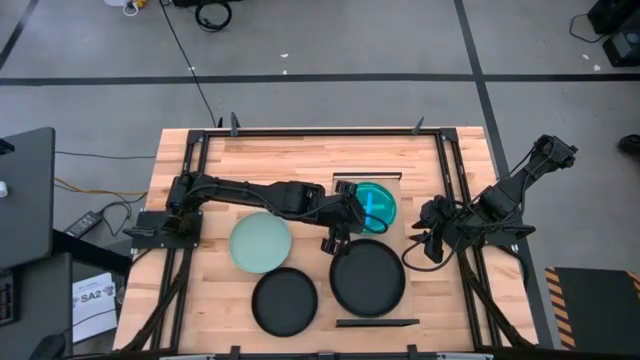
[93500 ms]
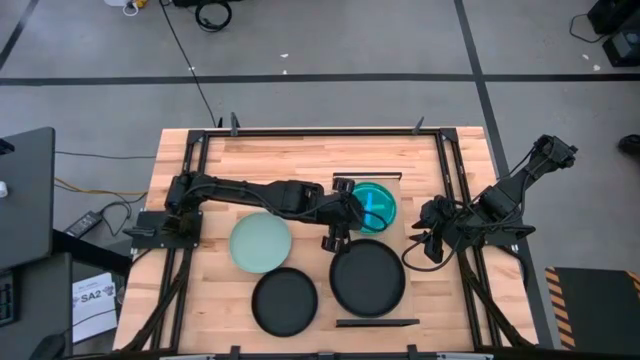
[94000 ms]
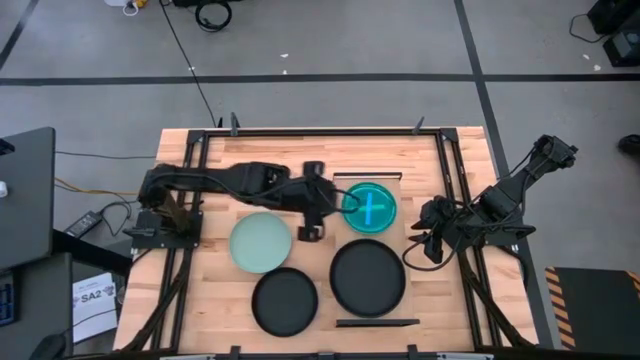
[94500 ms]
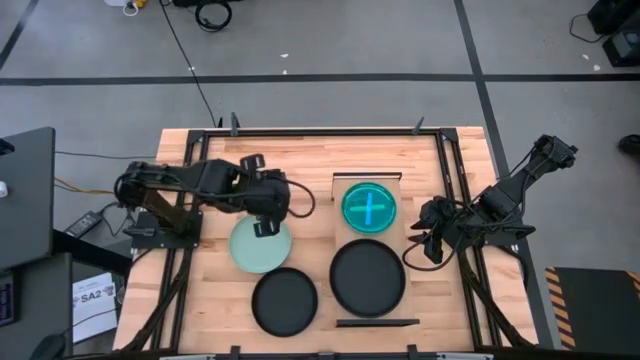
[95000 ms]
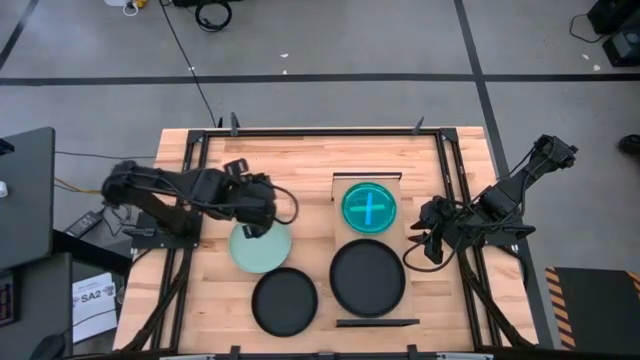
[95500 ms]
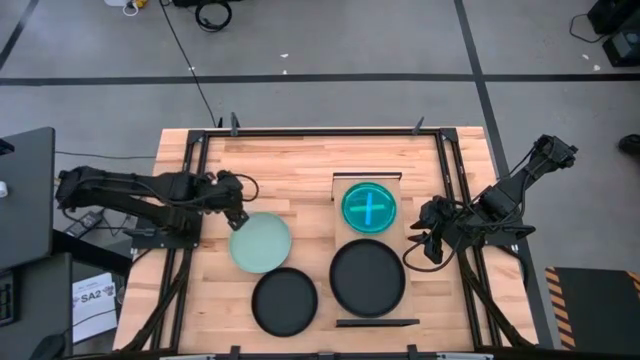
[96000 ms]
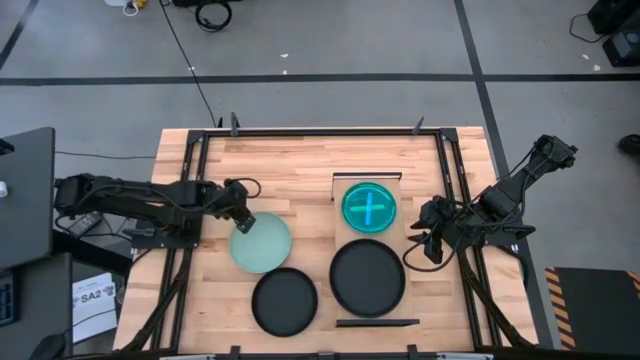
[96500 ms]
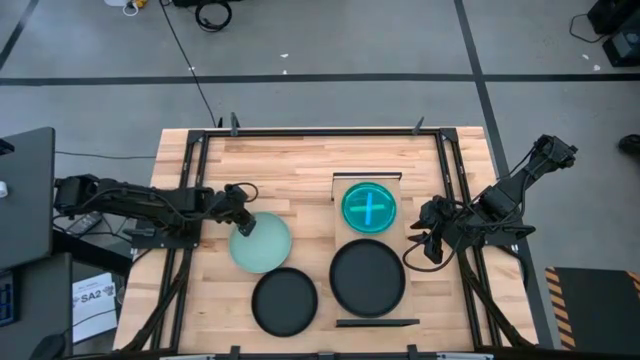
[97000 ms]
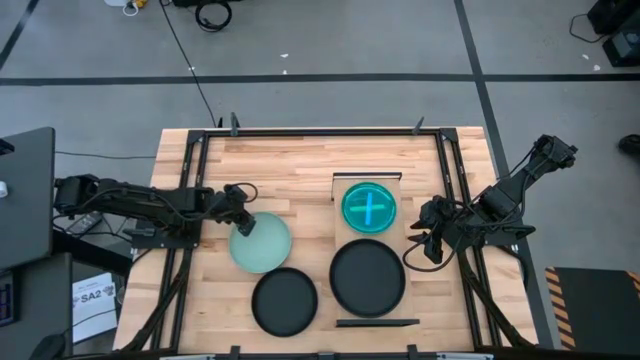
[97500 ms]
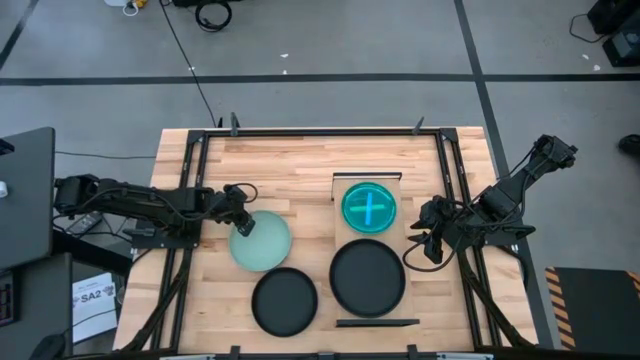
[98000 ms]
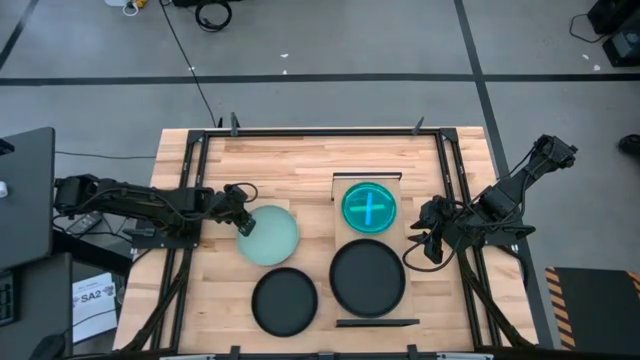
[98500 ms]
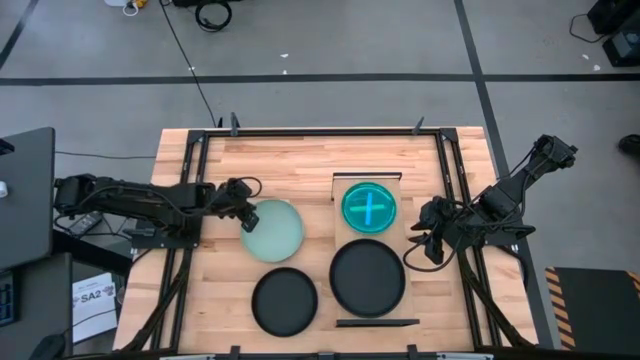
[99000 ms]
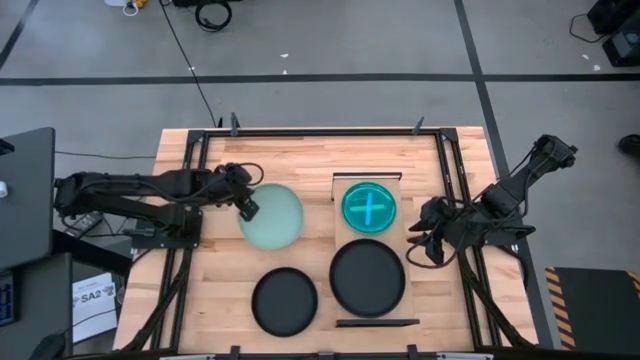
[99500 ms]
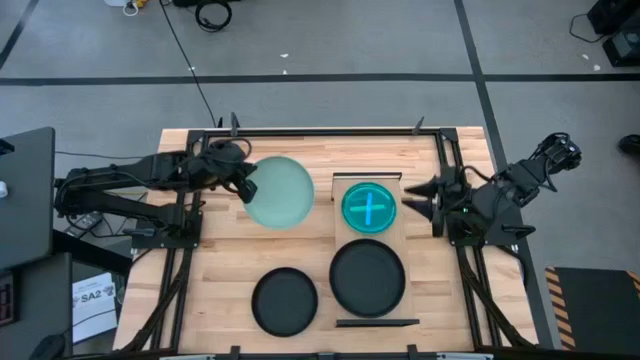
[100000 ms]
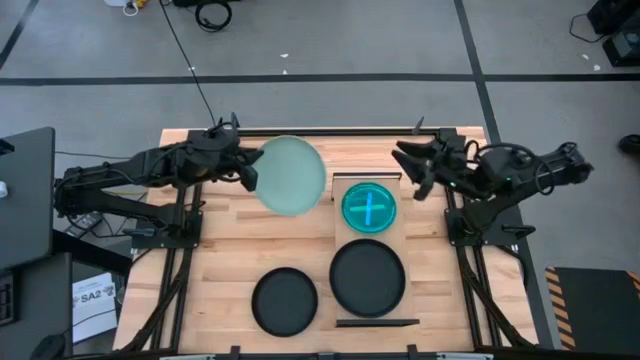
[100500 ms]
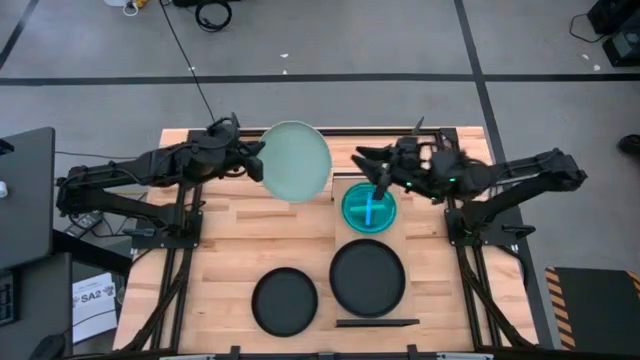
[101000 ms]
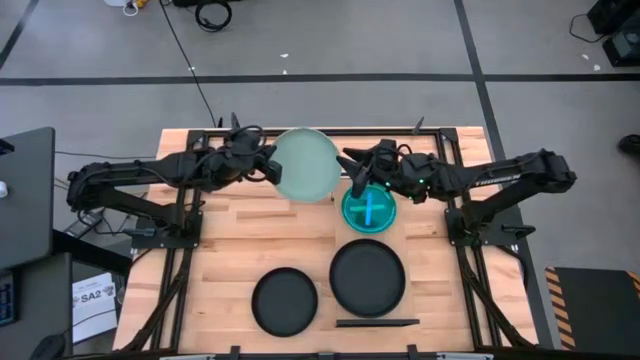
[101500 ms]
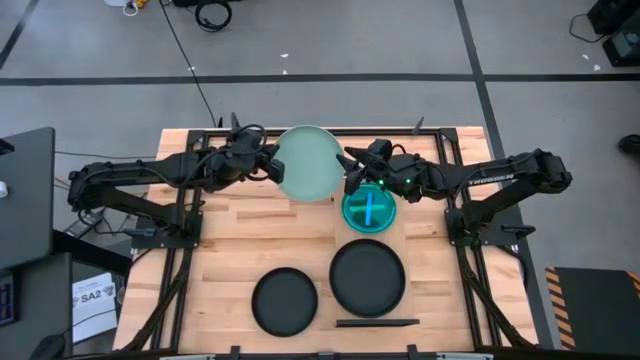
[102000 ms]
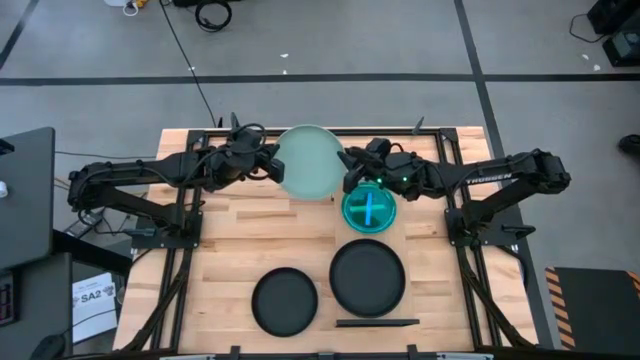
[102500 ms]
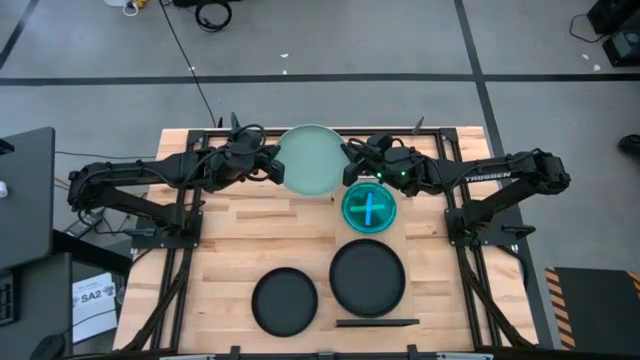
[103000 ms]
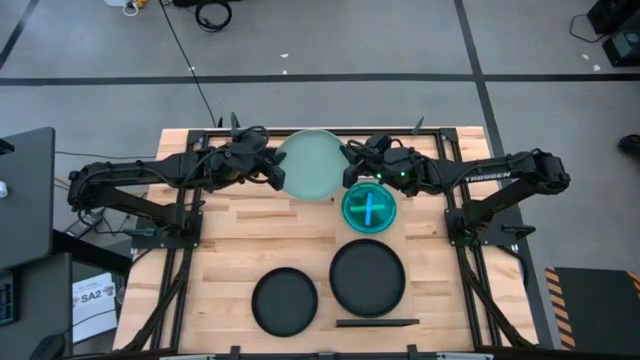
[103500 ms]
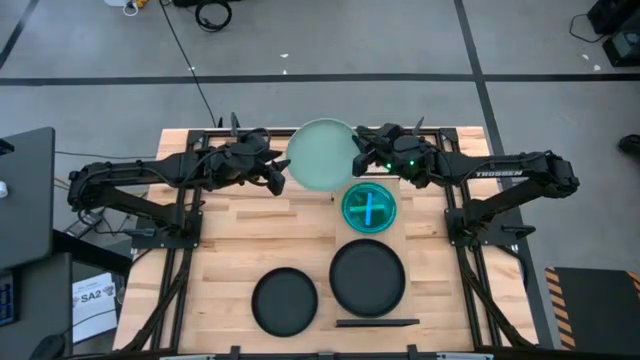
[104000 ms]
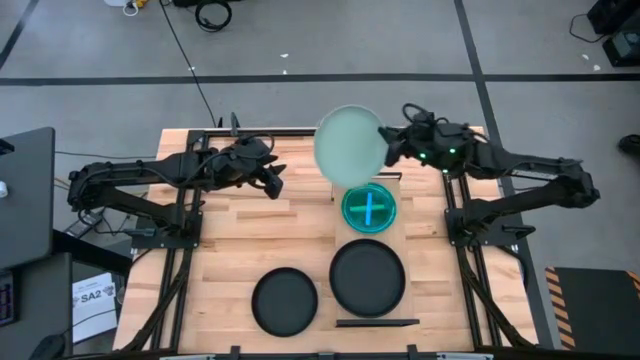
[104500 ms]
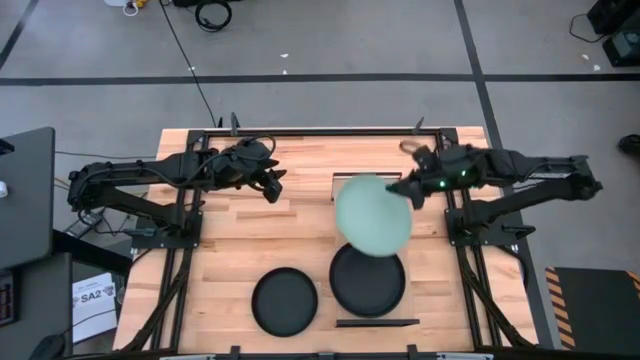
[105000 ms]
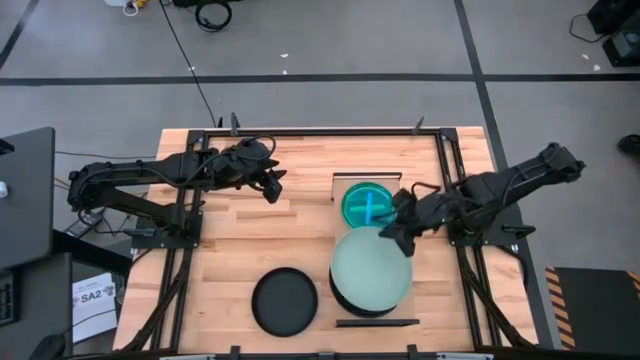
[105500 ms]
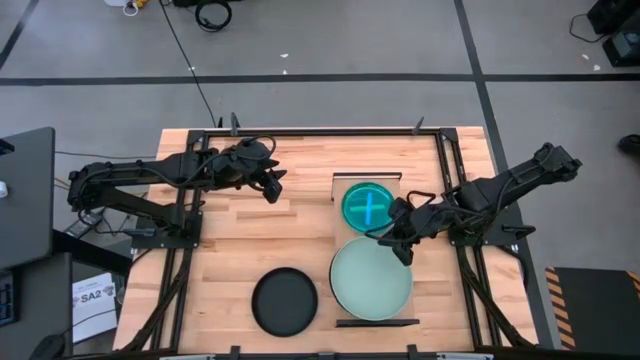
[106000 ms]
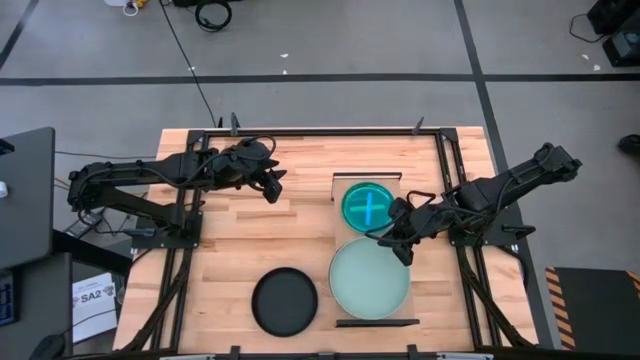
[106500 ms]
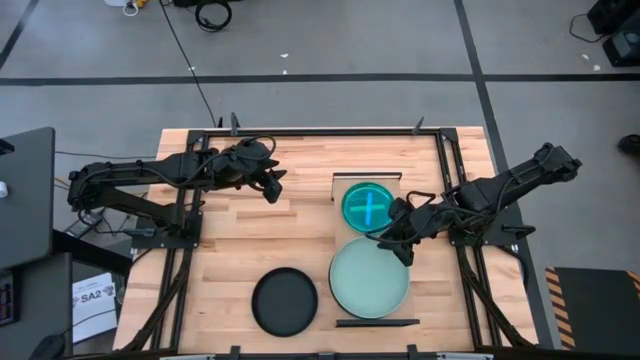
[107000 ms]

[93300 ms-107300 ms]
Task: Place and stack plates onto a shelf
Put the gray plate on the top of the blue plate on the shelf
